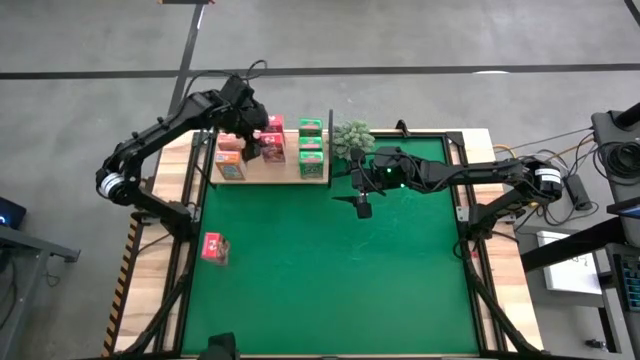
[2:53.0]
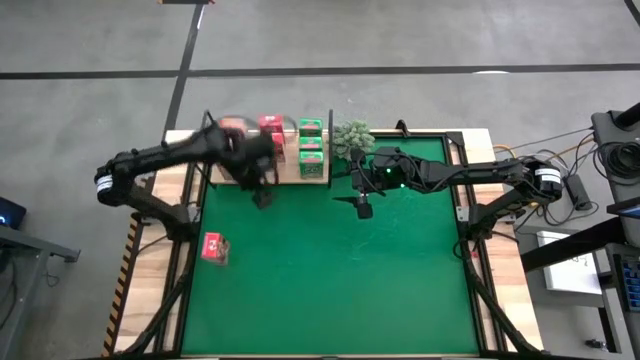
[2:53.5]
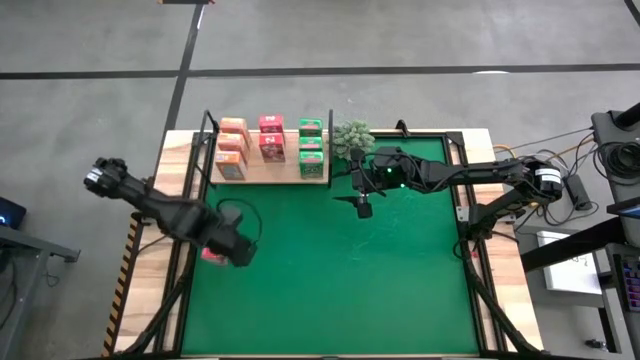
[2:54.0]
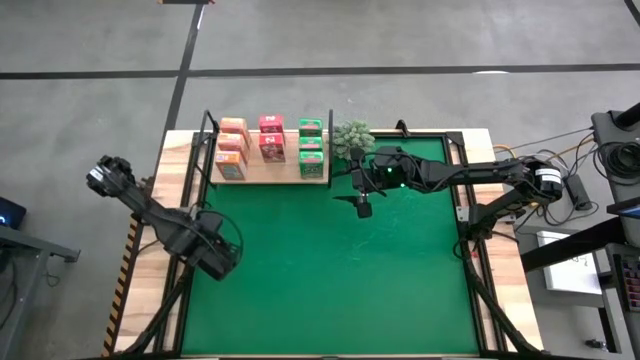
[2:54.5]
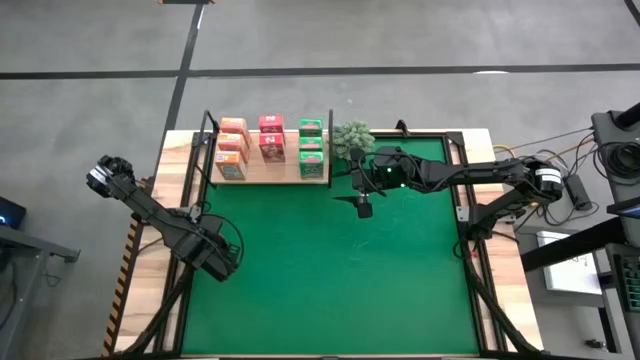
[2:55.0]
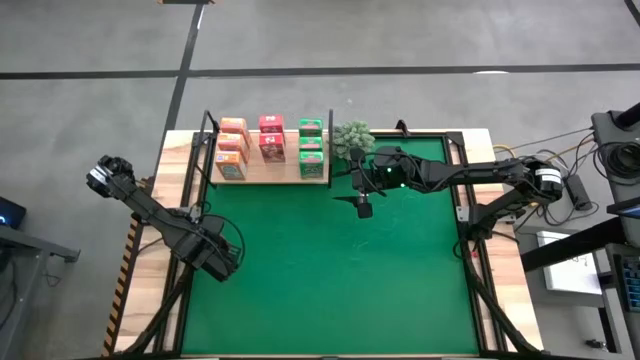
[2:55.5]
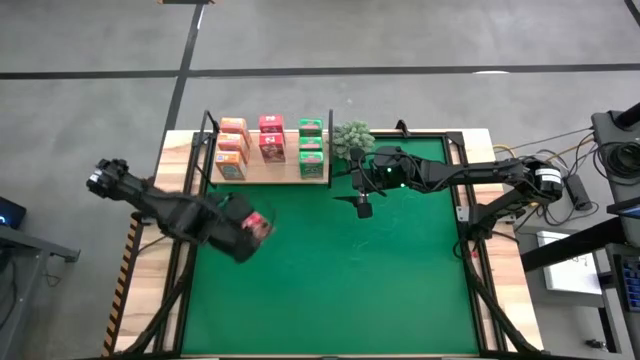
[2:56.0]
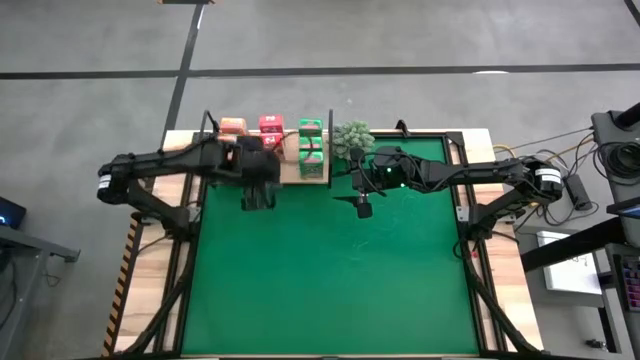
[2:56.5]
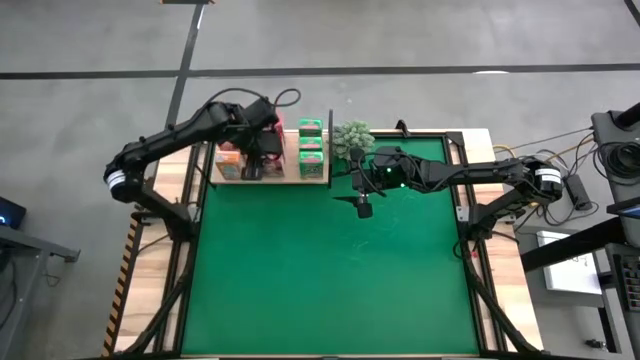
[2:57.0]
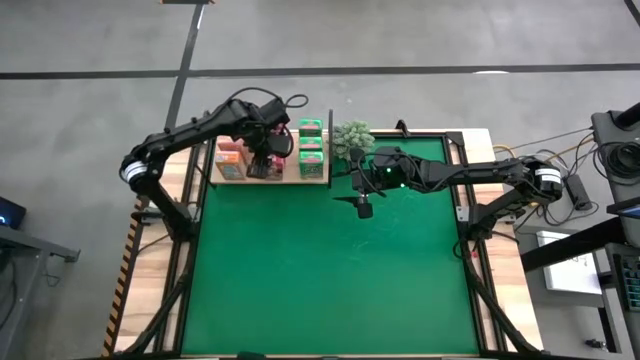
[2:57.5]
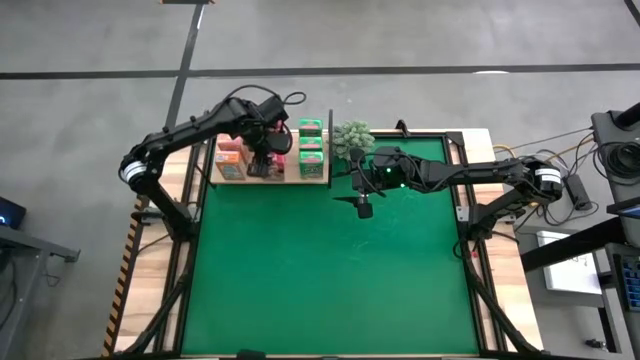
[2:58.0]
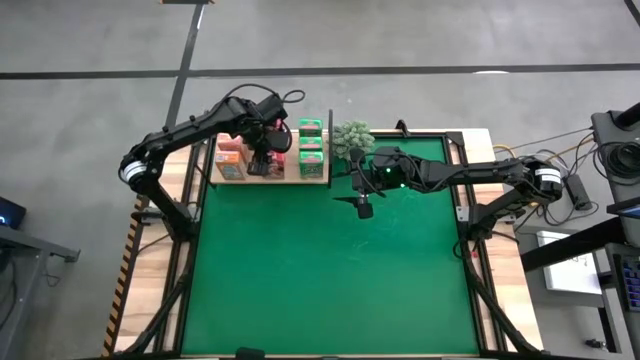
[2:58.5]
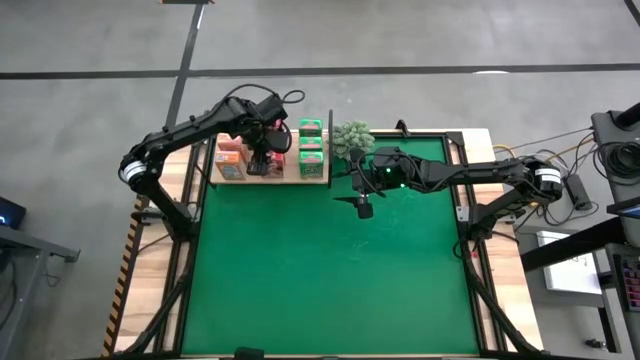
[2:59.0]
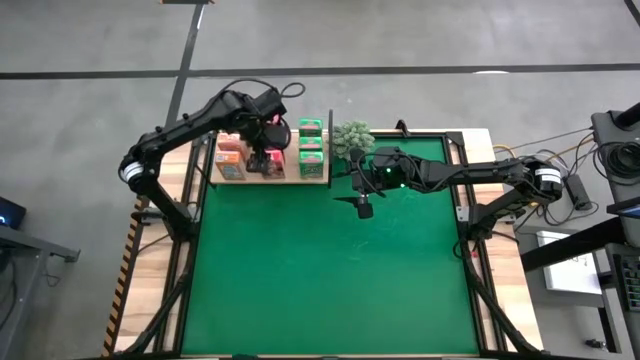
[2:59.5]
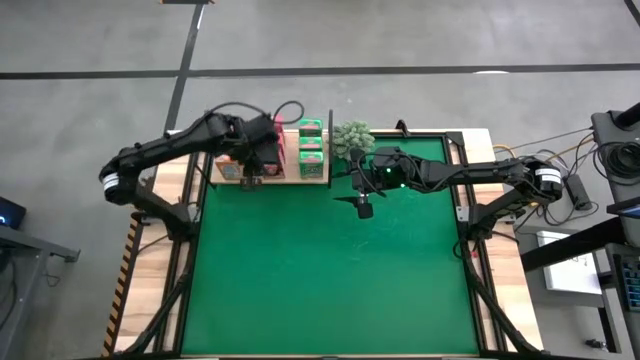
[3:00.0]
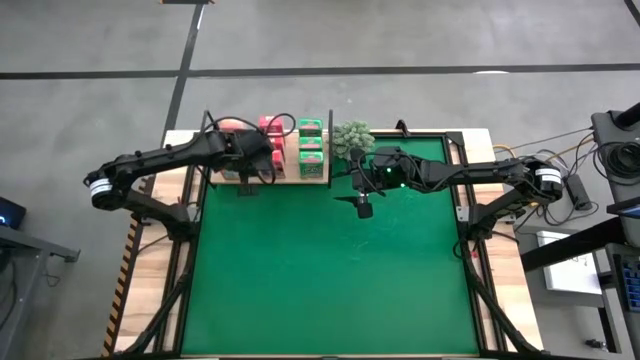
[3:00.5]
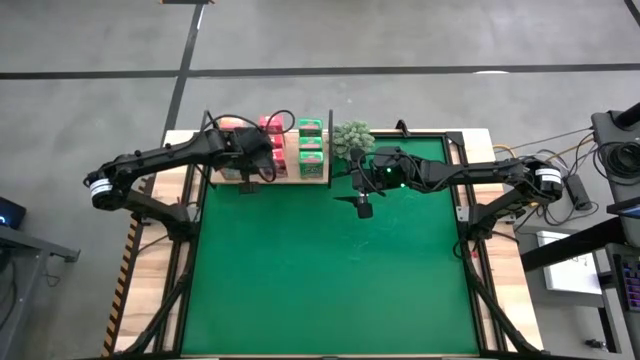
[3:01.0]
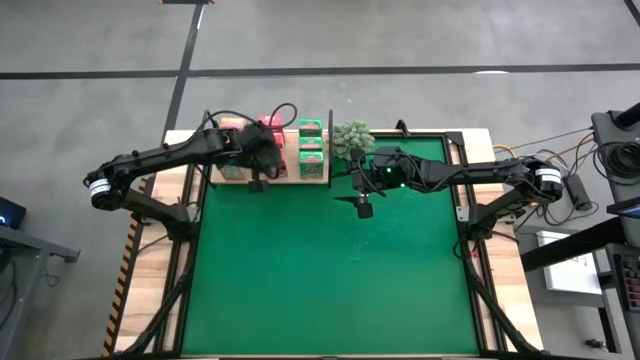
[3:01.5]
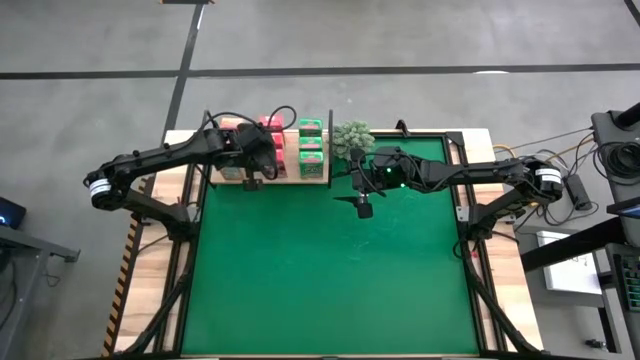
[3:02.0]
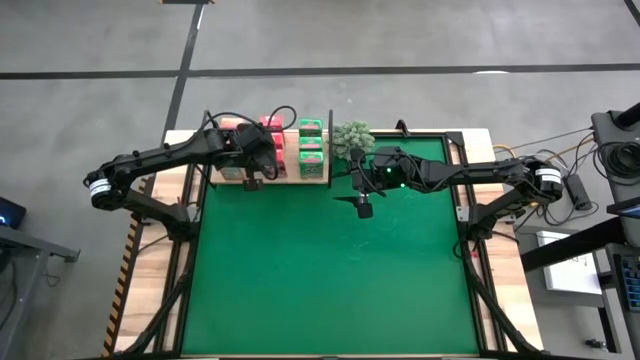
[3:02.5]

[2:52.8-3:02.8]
Task: Stack cereal on shelf
Put the red cereal box on the shelf aligned with the other red cereal box

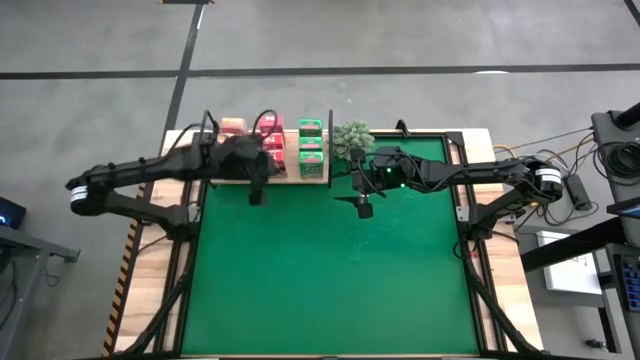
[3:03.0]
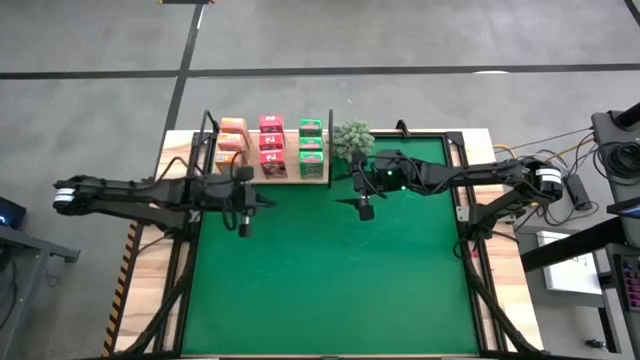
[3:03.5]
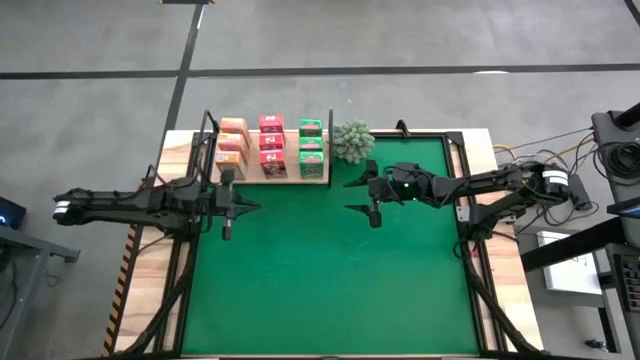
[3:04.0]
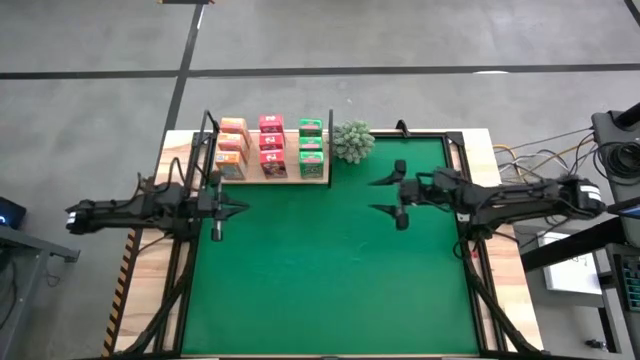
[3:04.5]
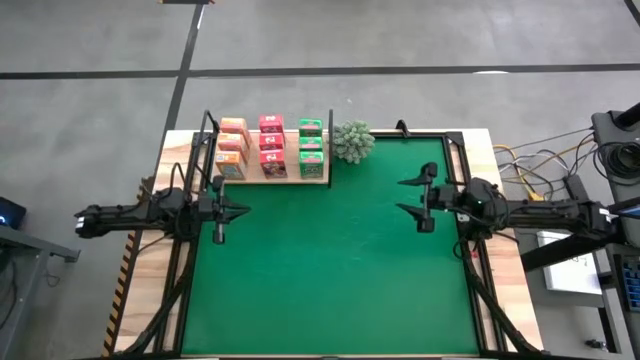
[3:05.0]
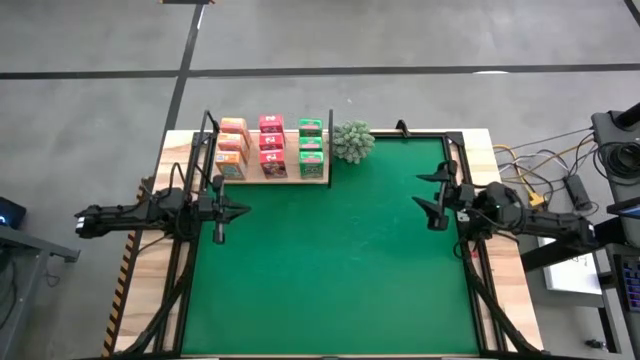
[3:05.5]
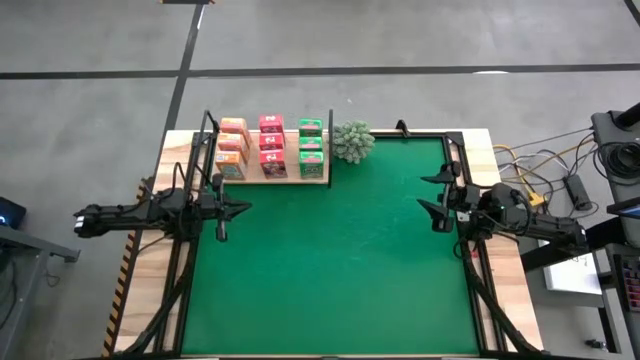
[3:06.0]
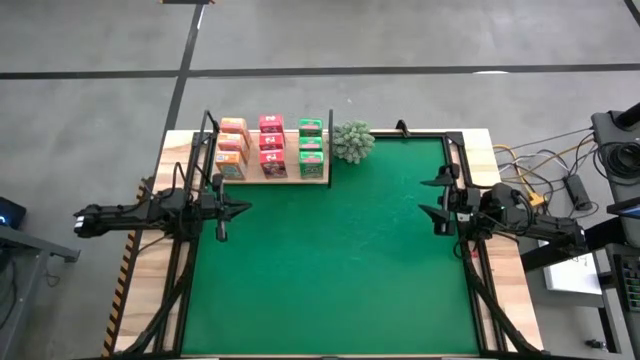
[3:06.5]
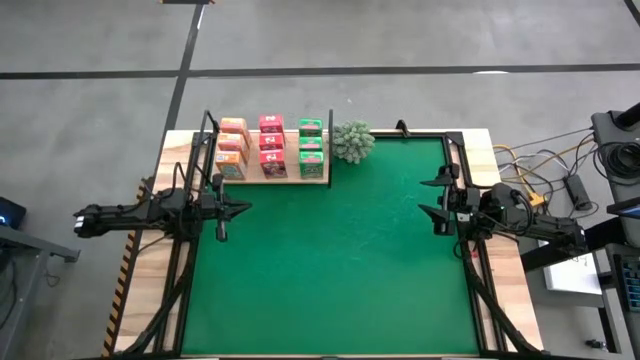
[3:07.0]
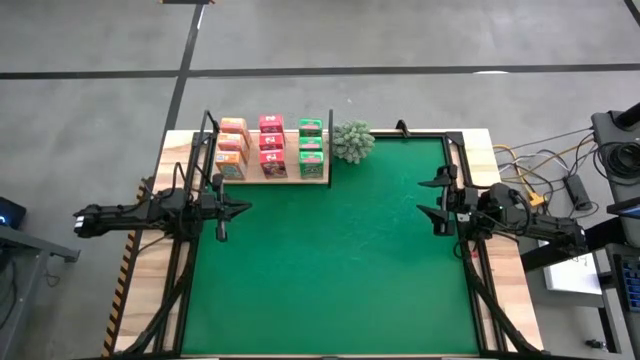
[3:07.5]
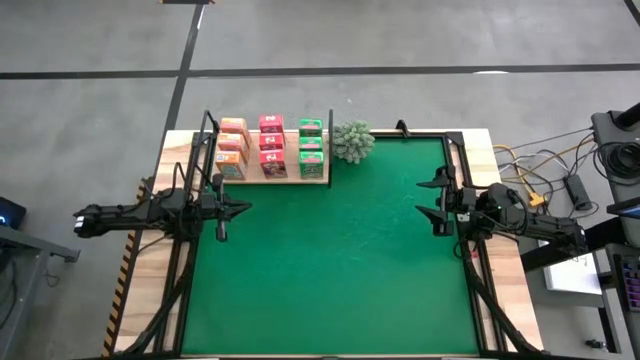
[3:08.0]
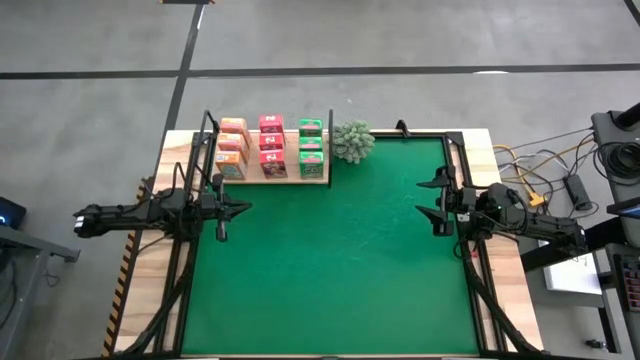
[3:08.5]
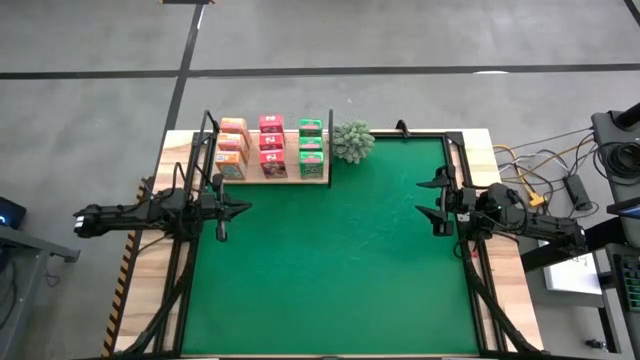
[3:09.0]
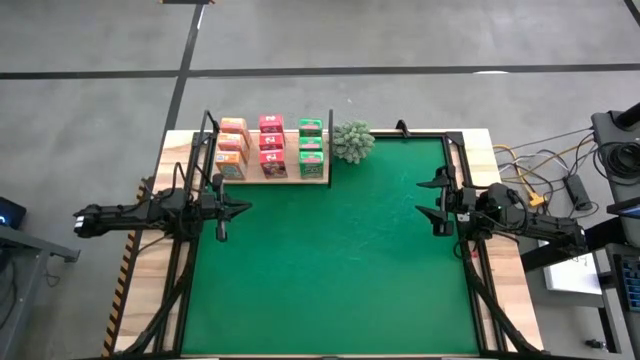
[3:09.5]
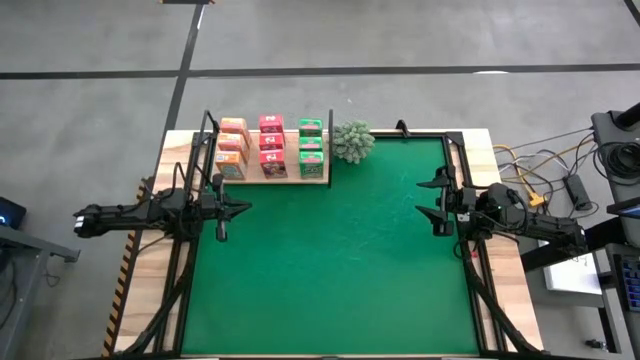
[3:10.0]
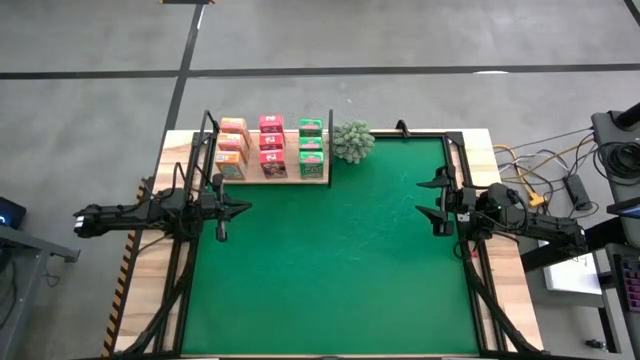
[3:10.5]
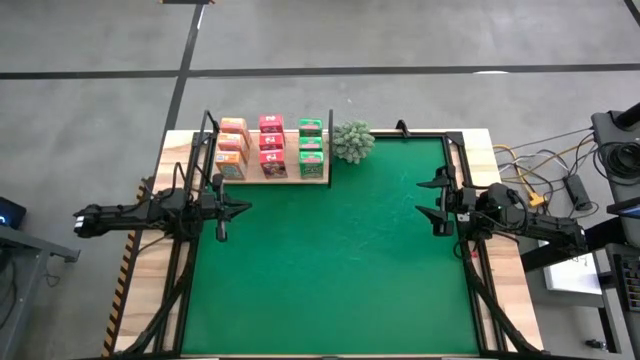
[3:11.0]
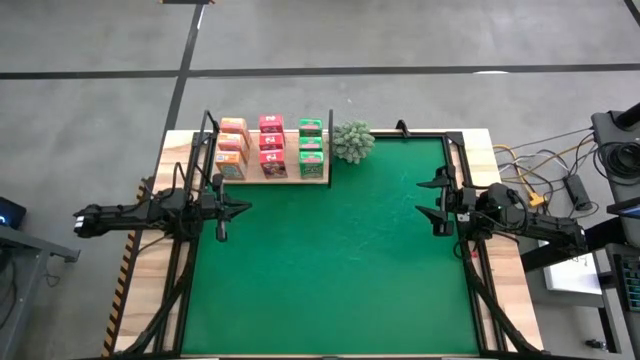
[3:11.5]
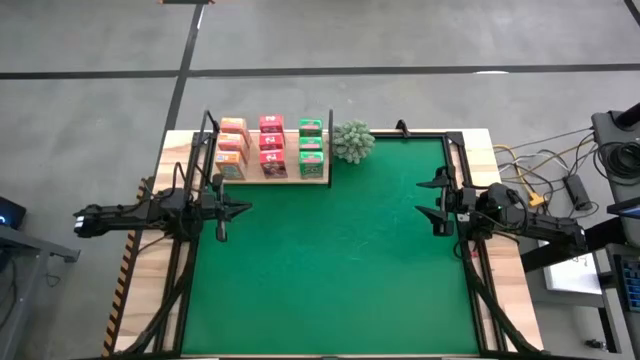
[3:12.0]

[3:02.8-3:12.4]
Return to Home Position
